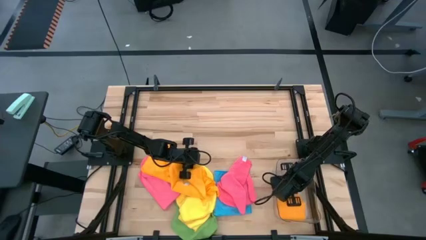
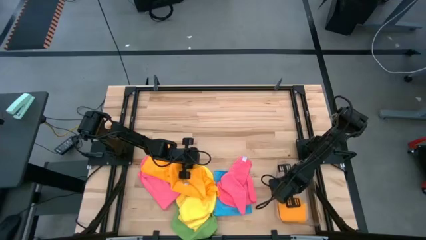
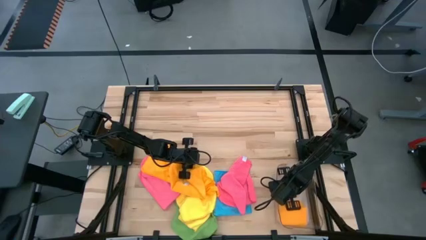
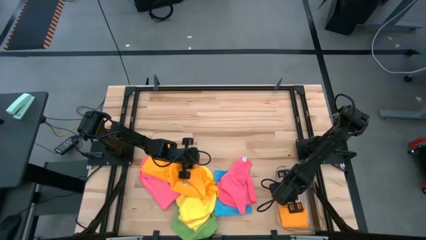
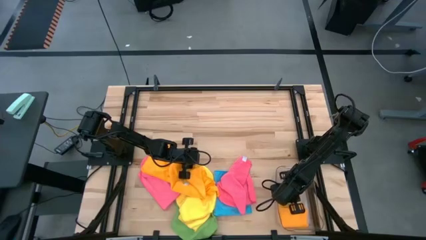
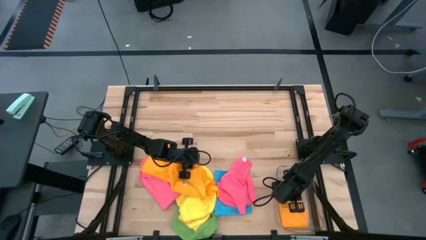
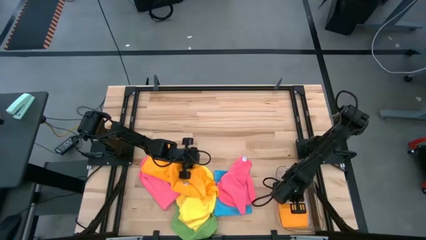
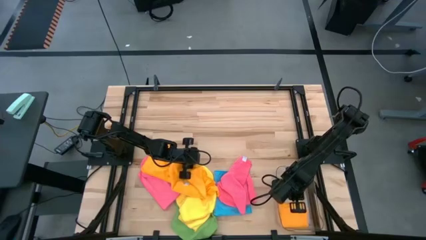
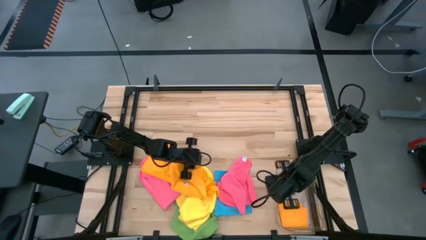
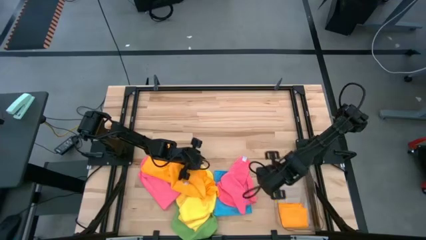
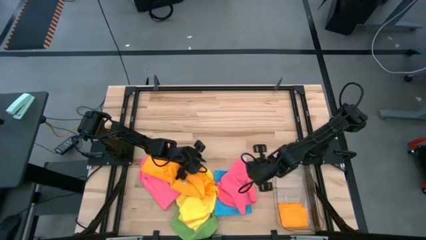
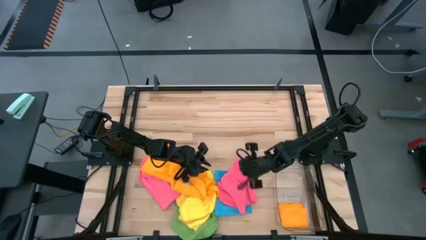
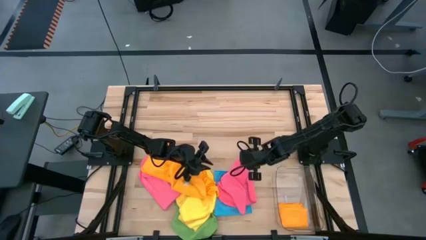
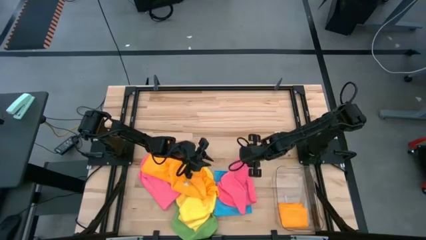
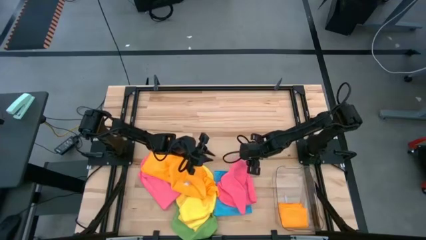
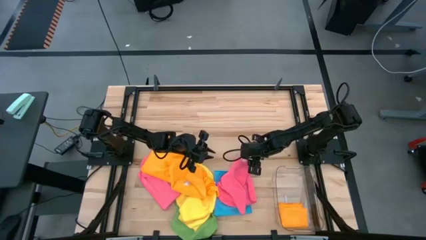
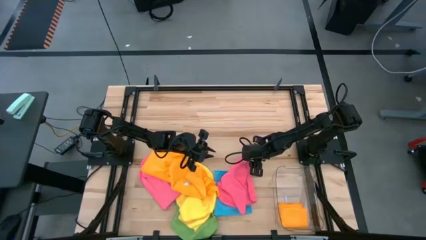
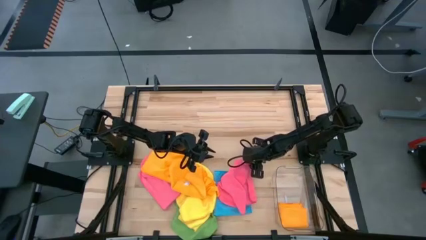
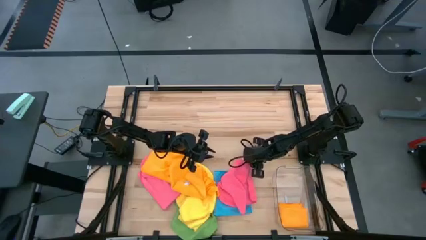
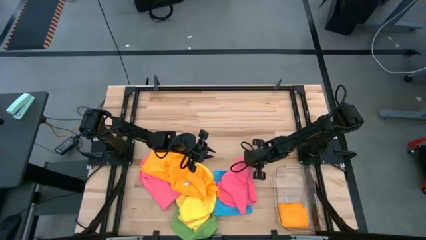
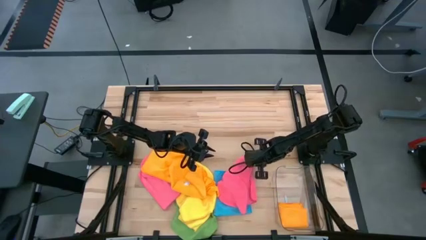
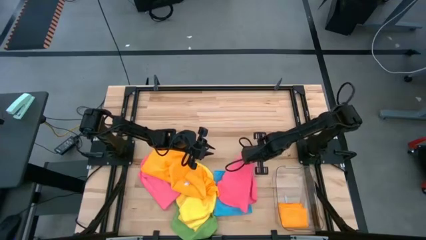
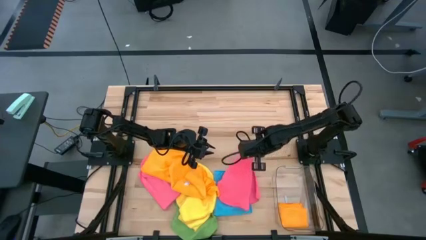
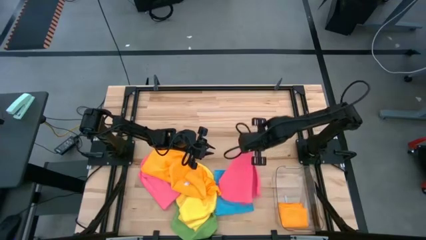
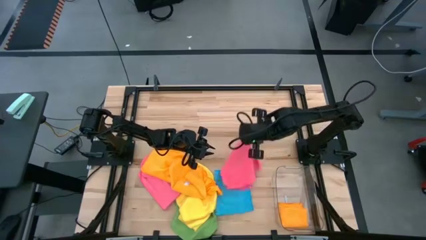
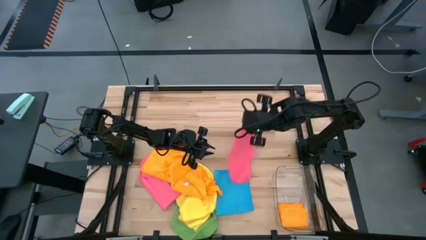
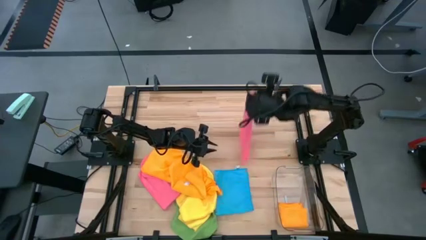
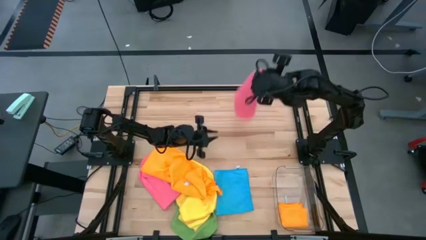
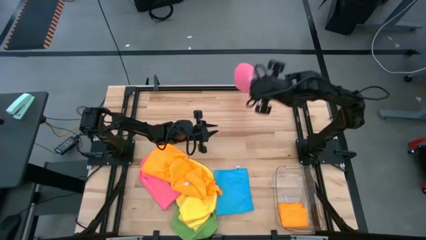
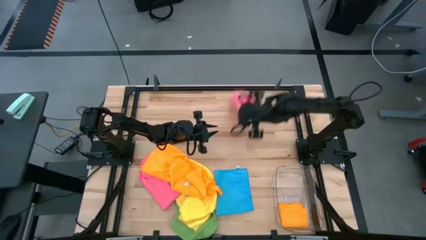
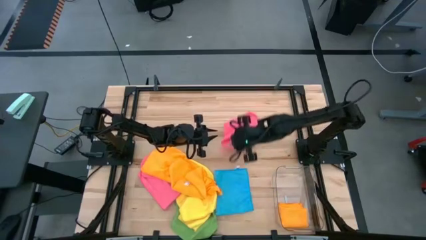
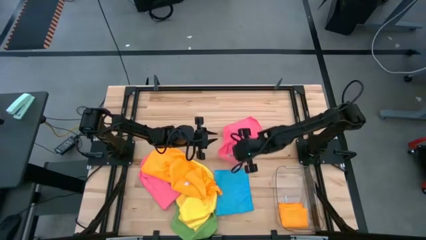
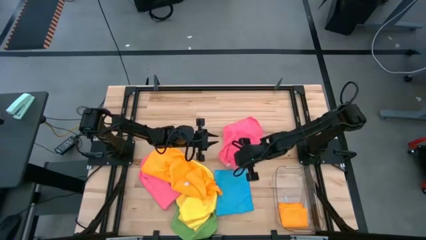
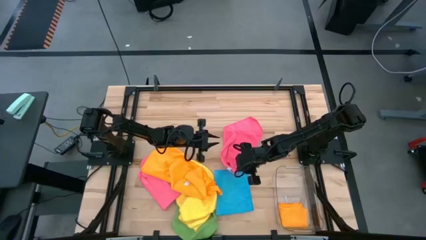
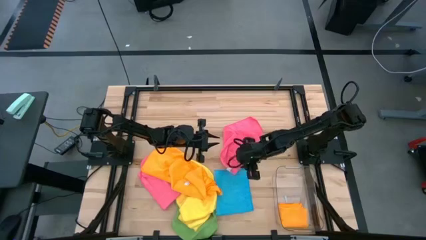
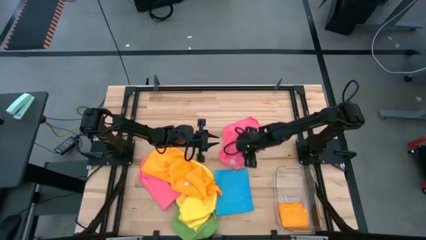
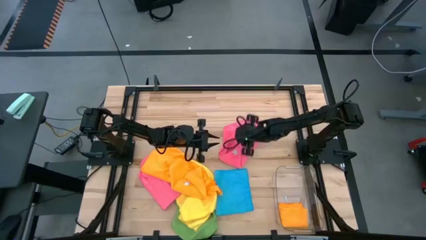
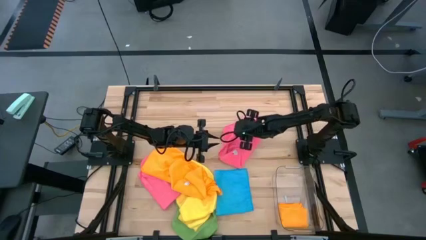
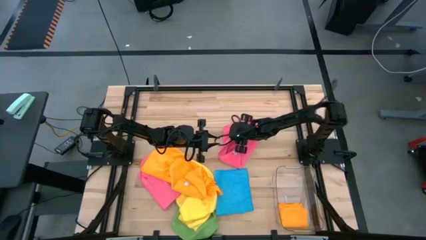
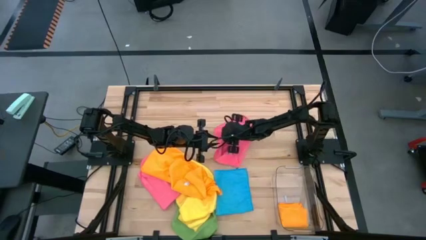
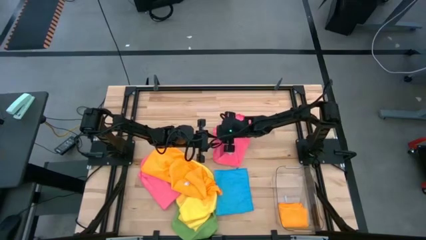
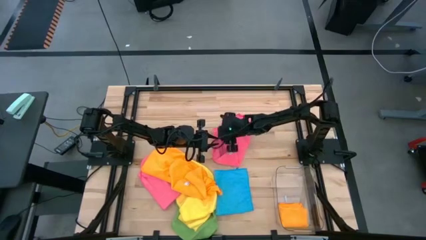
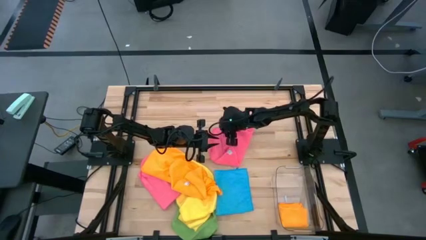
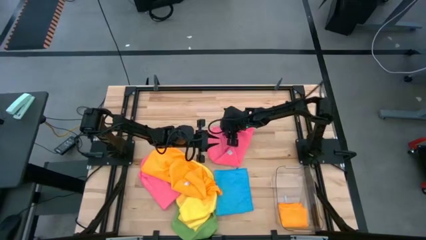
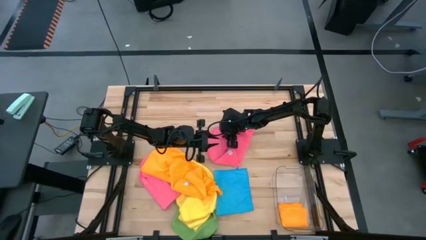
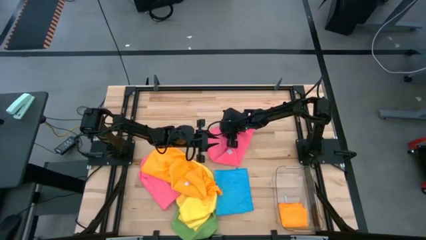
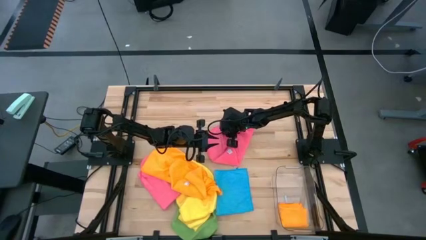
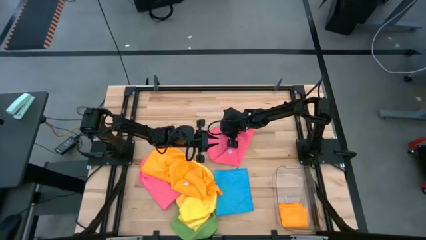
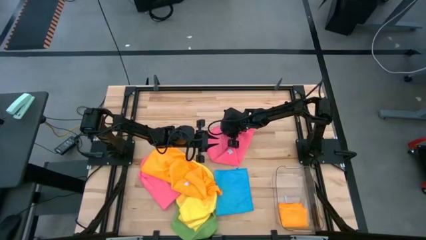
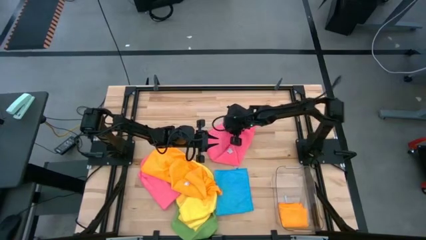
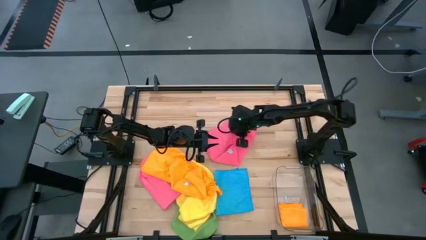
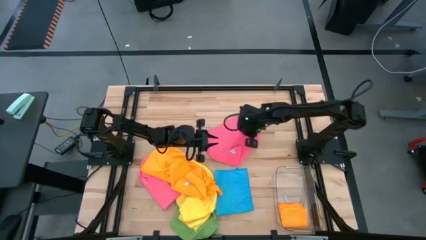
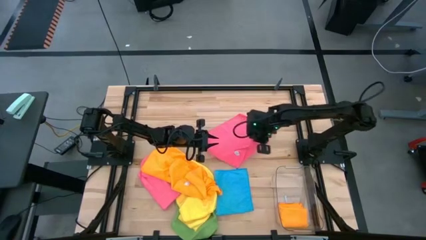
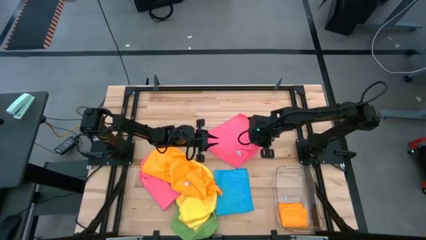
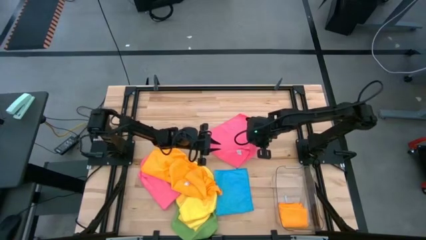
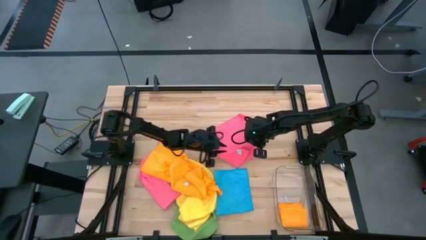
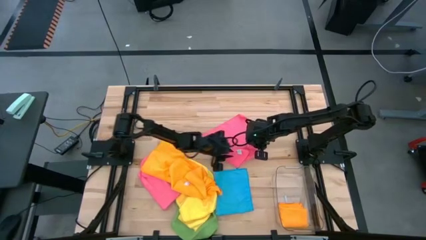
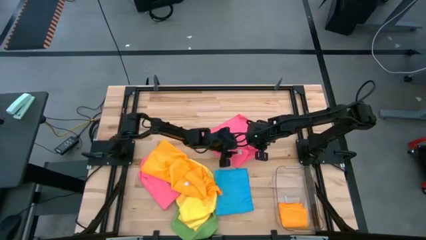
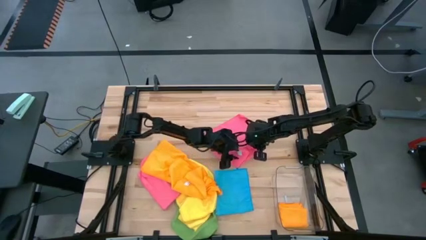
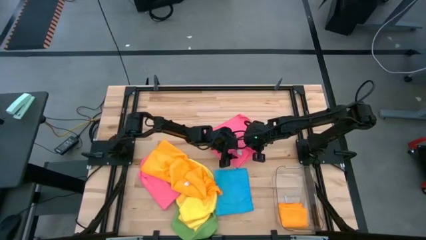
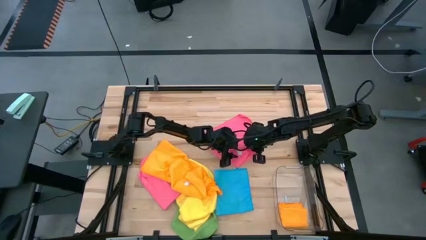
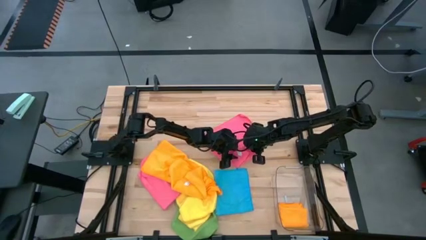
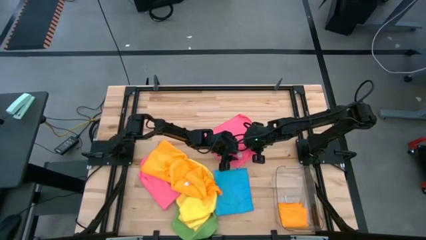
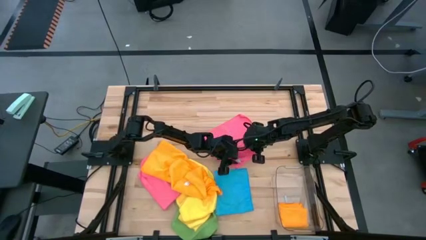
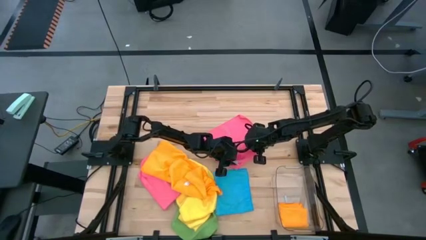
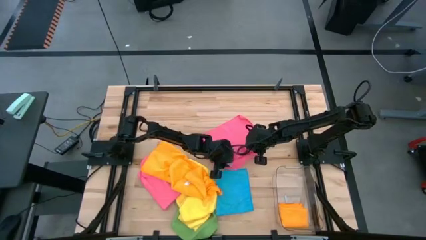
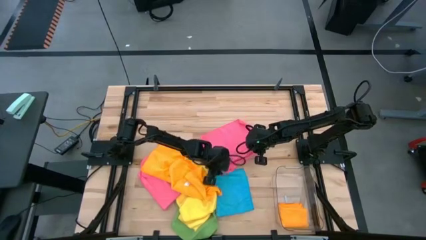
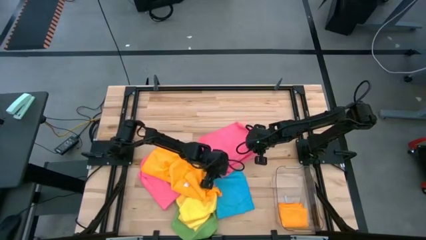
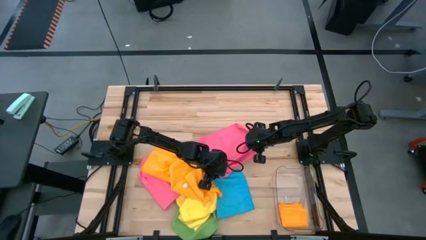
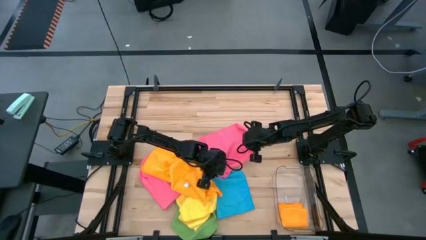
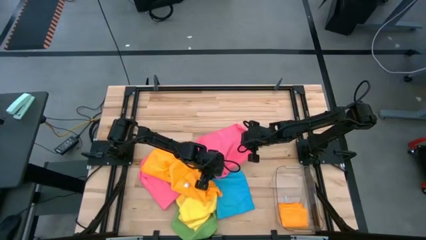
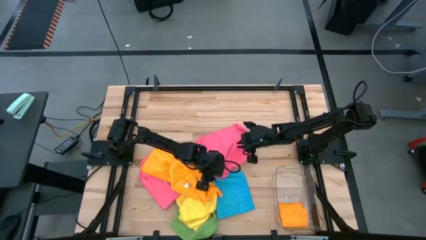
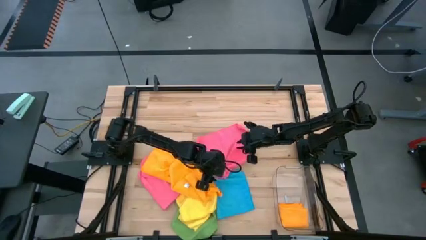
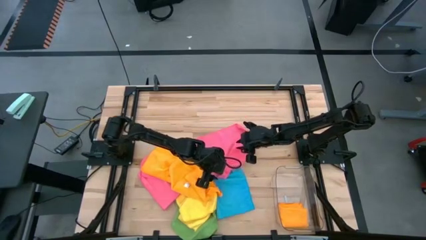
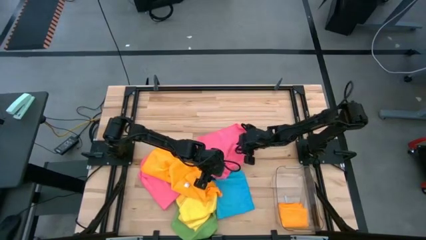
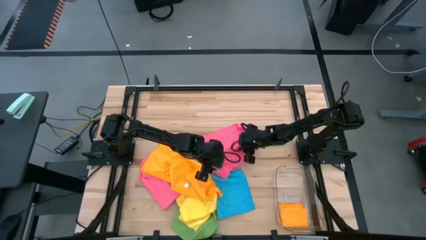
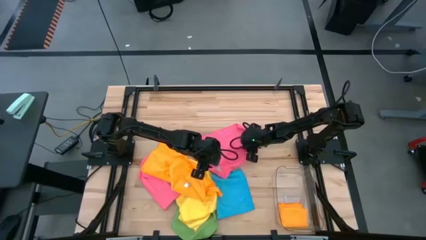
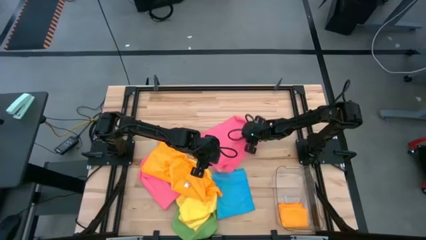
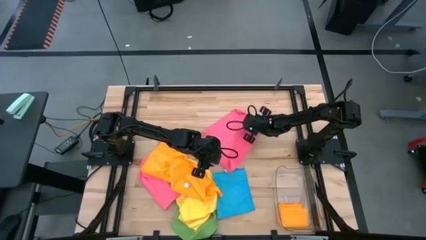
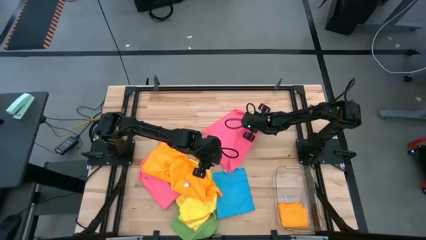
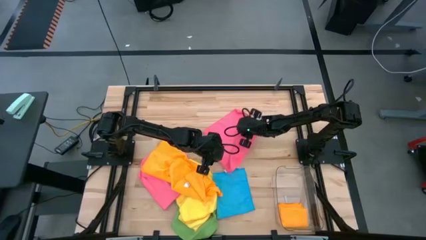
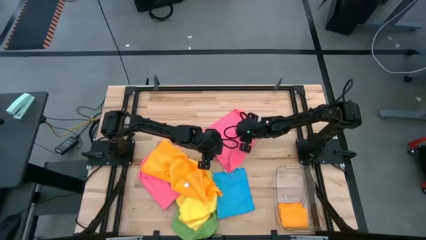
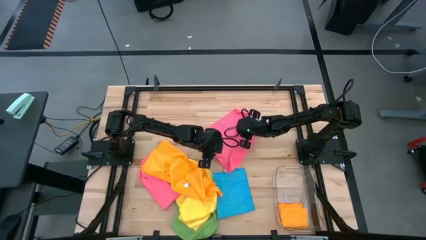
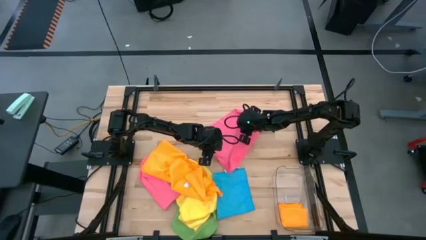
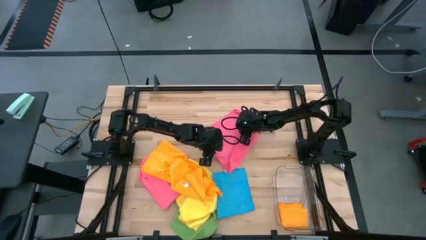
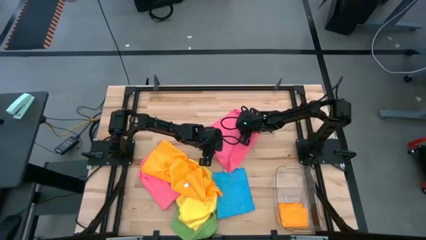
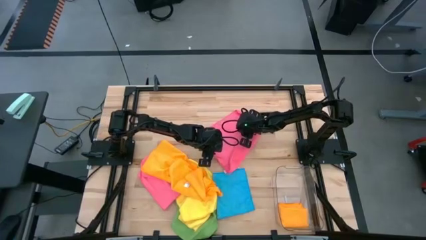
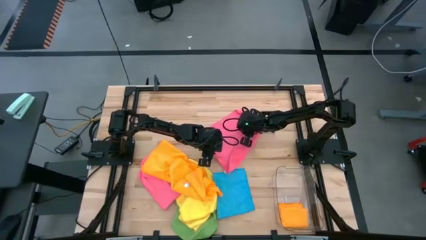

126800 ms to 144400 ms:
Task: Fold microfiber towels
Fold the pink towel
